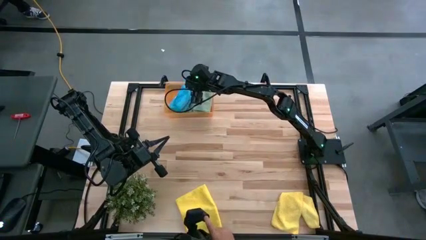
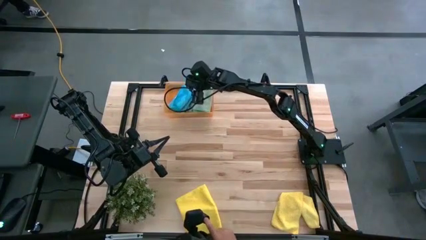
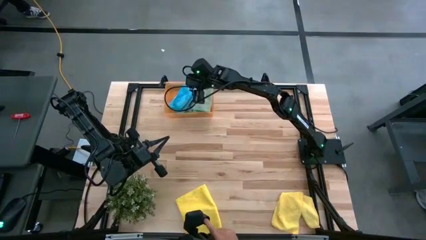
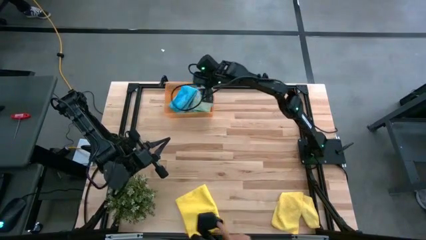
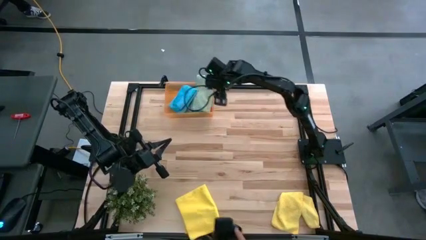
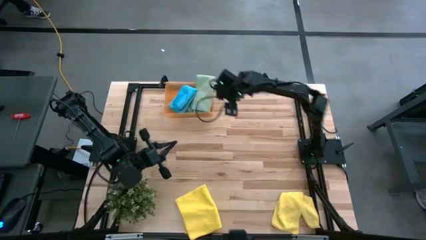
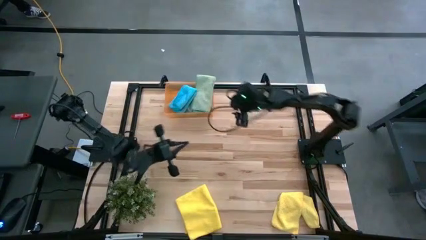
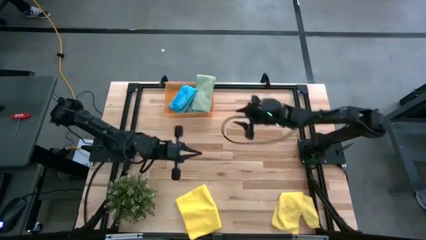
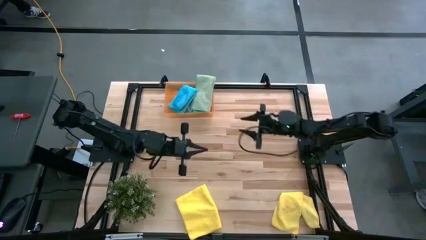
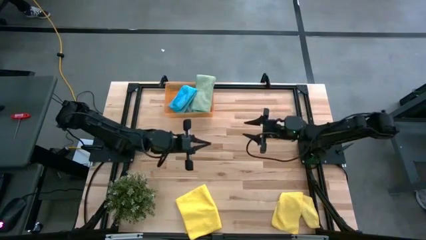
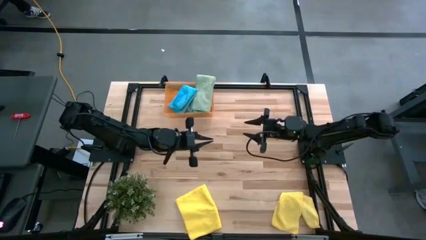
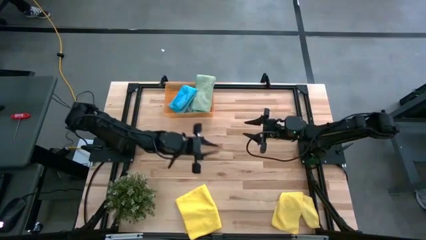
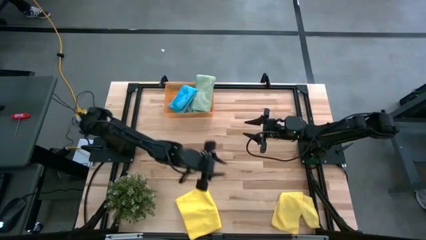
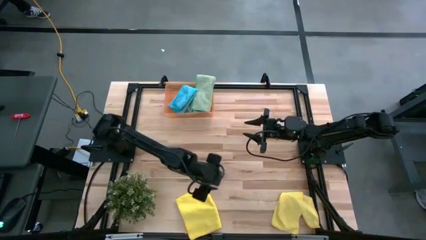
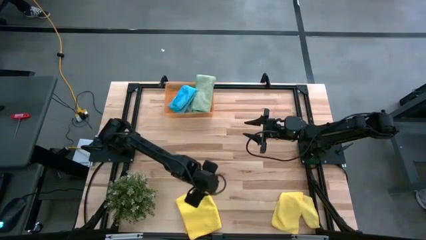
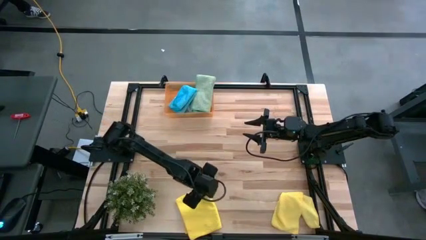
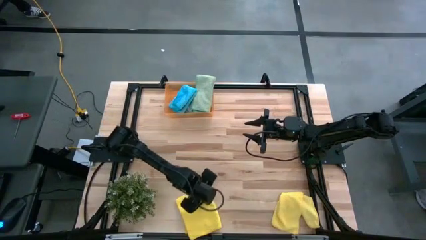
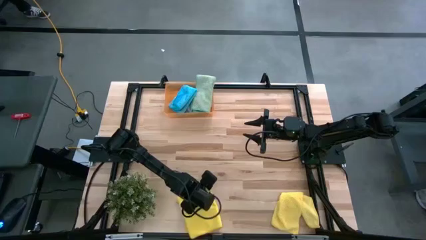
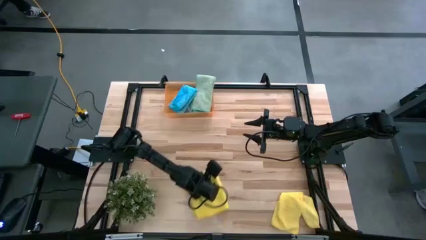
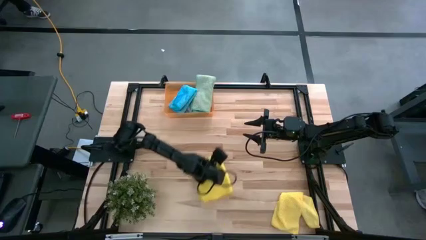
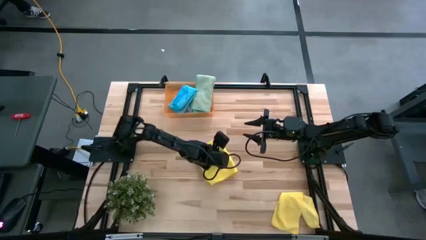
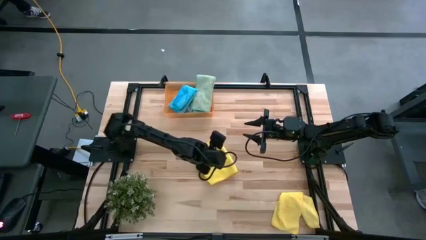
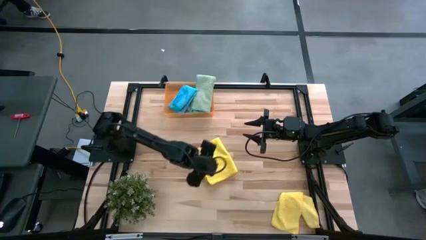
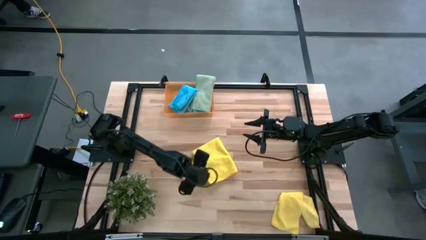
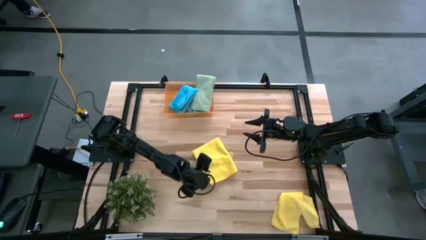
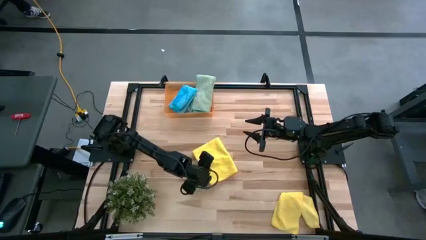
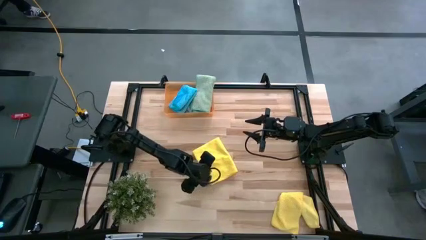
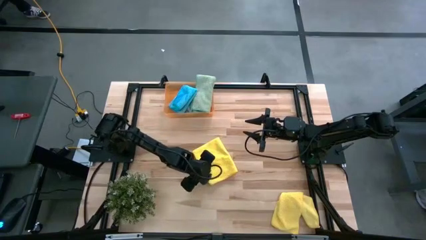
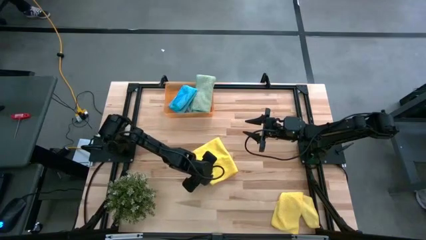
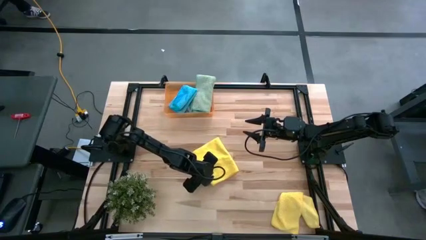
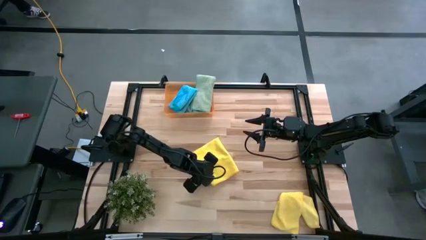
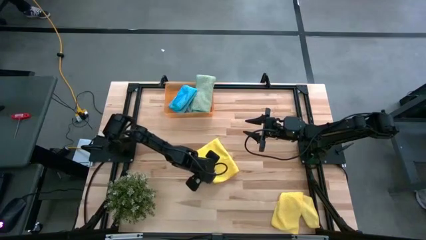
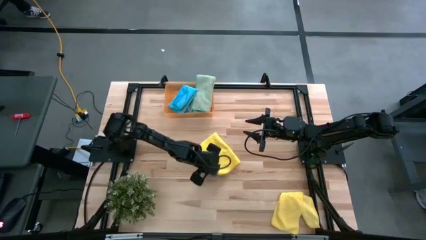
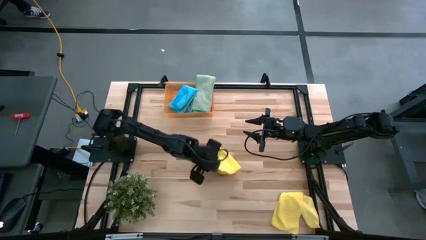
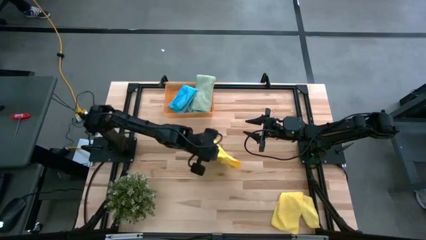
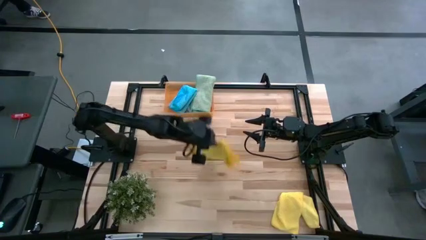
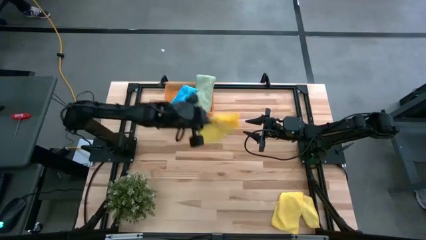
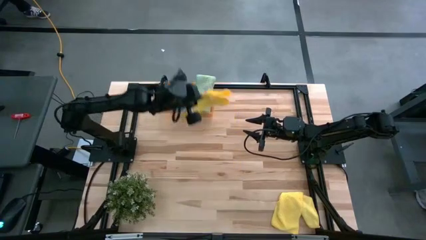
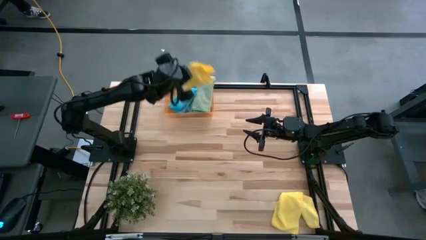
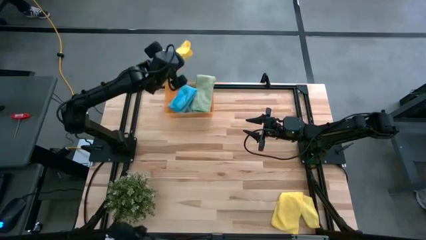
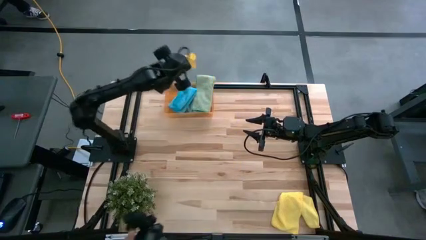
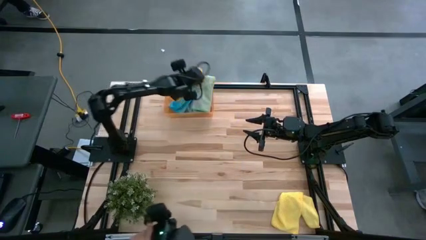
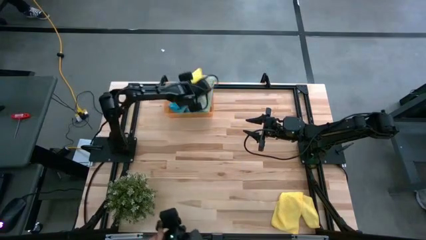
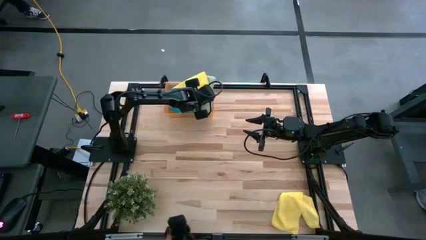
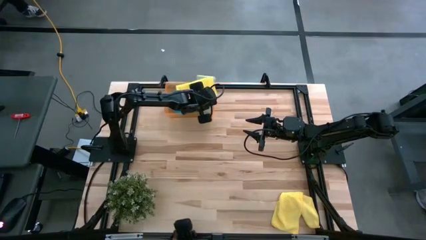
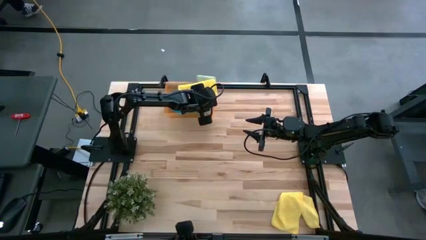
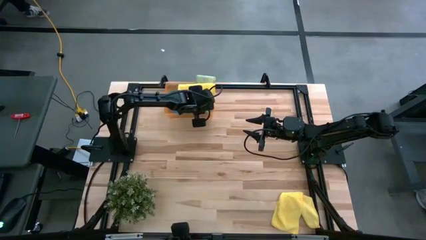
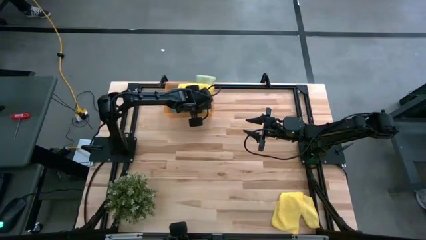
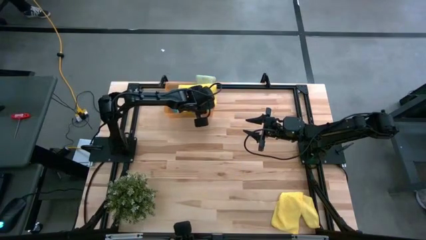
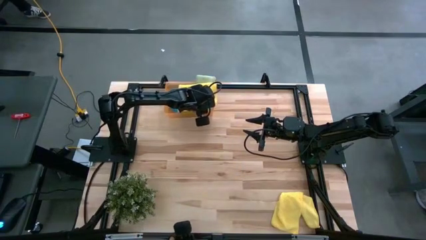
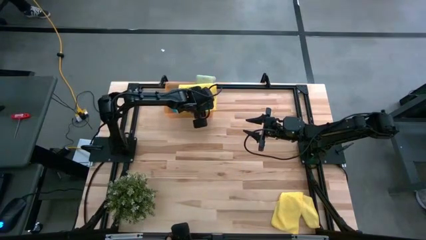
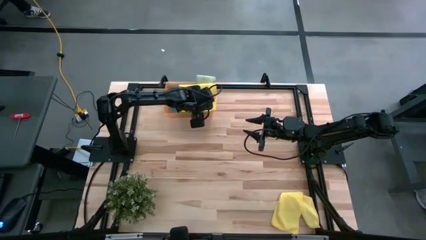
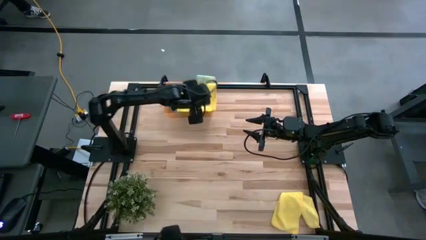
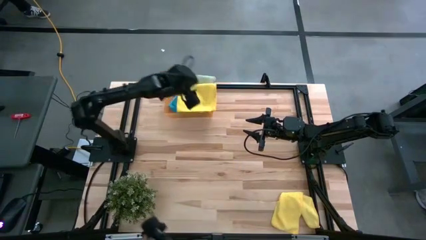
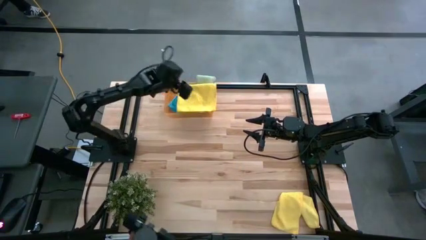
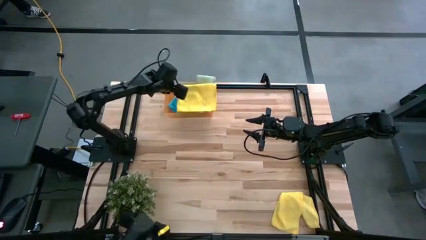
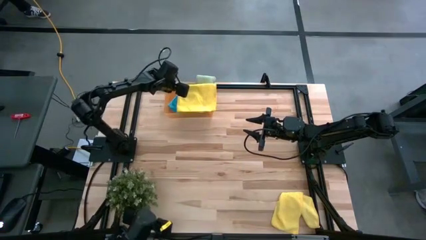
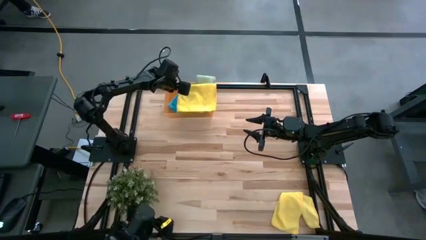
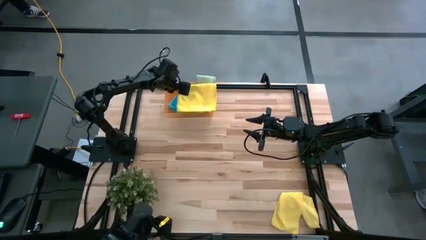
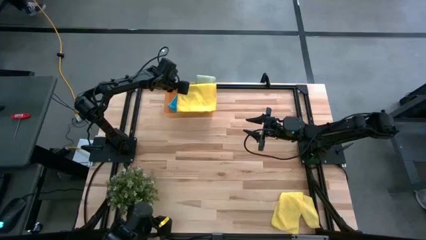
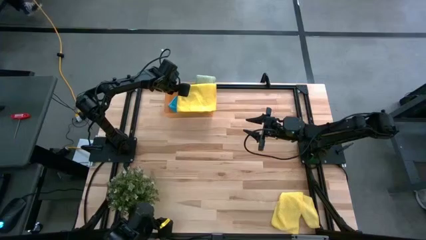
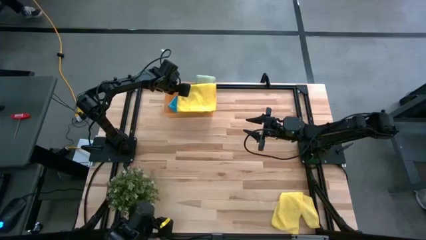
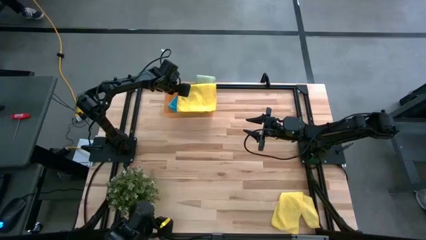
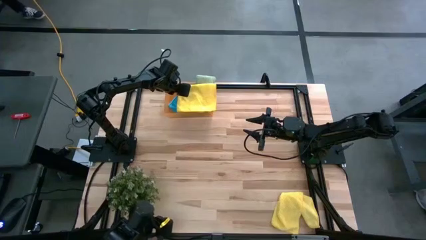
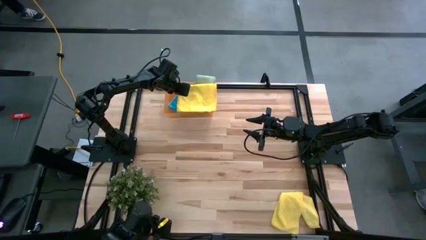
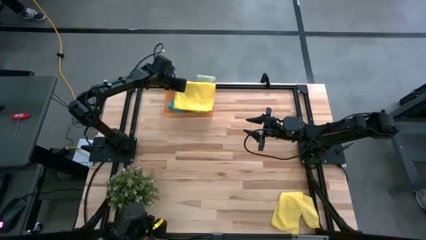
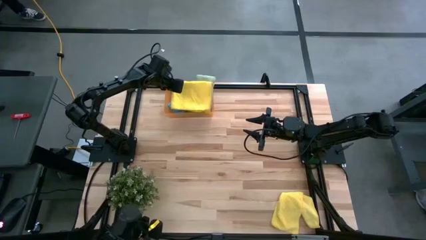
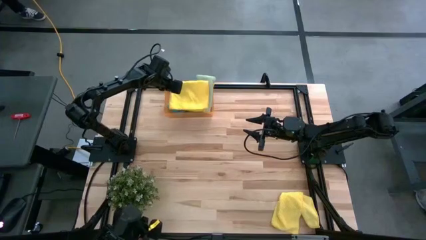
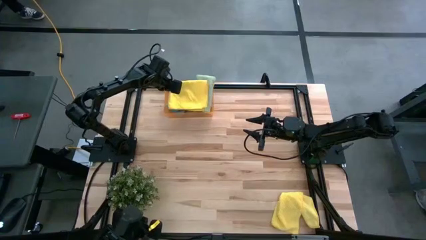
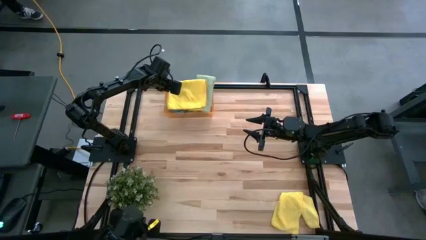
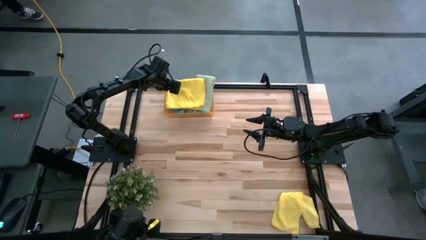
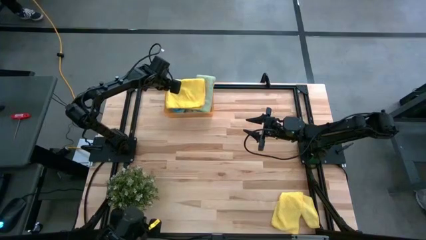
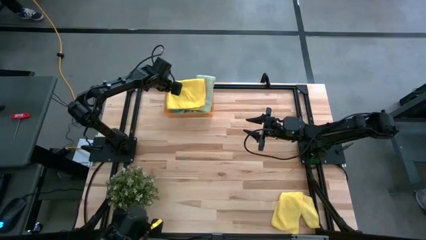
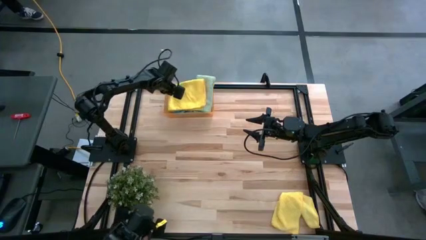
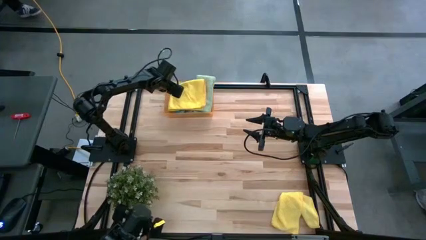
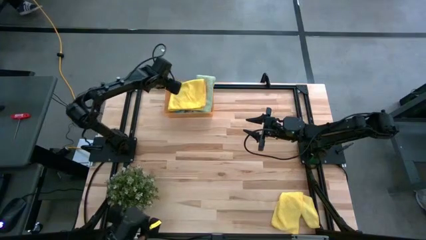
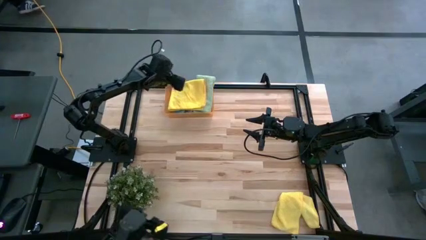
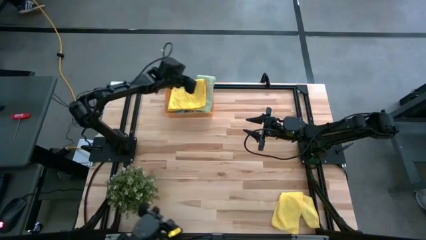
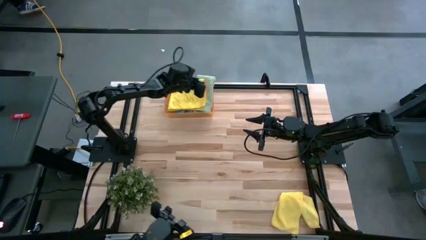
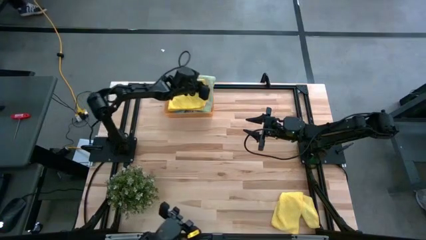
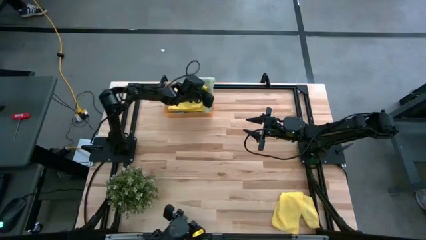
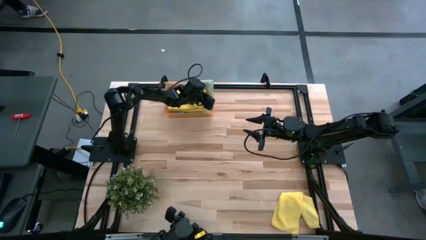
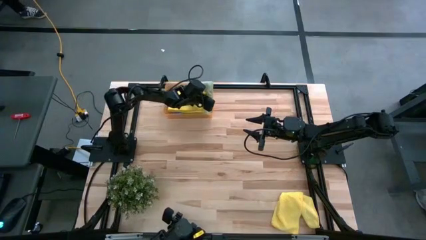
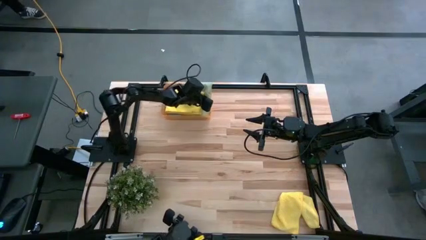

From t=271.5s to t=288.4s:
Task: Fold microfiber towels
Put the left yellow microfiber cloth into the orange bin

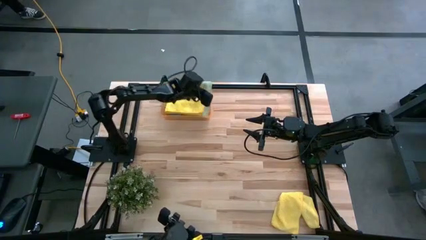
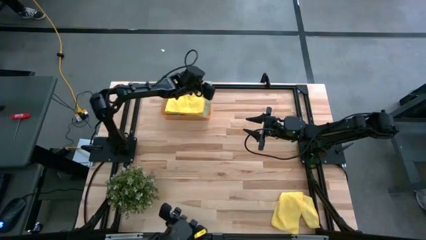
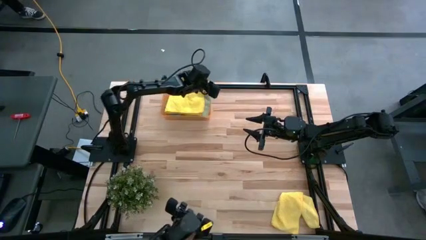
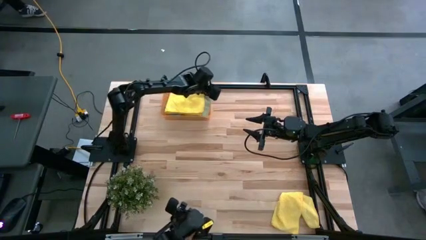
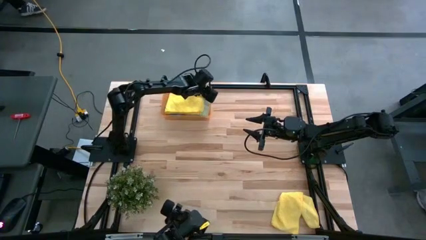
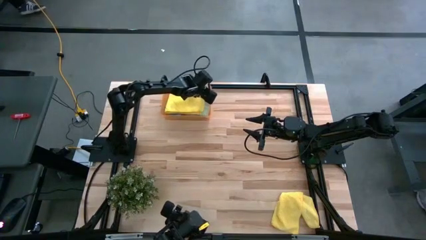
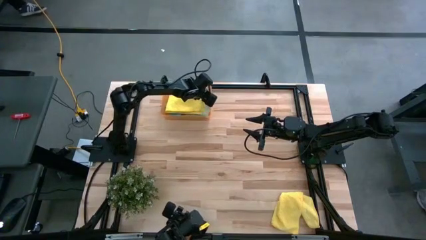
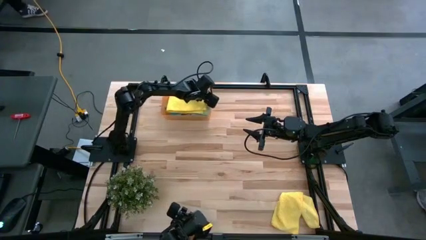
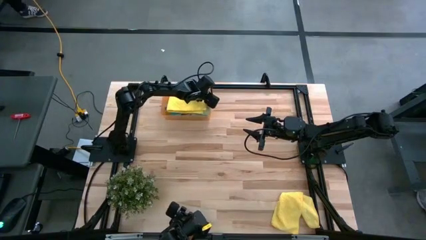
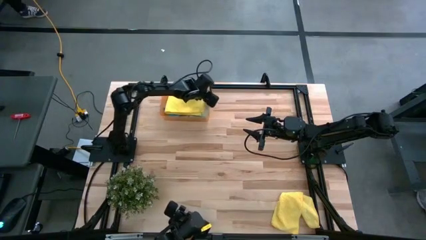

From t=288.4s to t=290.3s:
Adjust the green microfiber cloth on the orange bin
